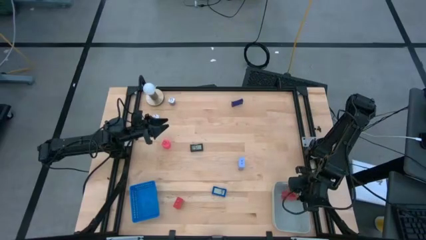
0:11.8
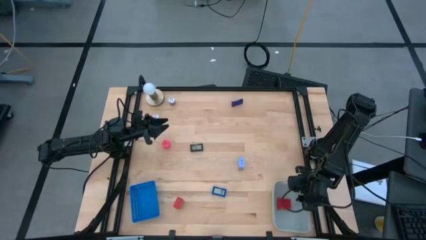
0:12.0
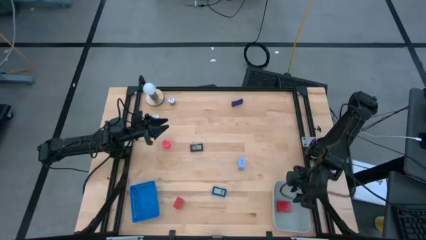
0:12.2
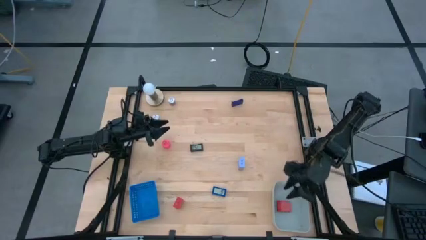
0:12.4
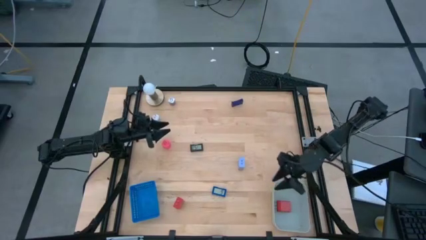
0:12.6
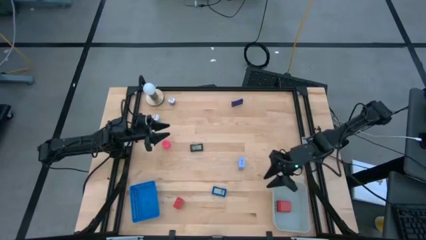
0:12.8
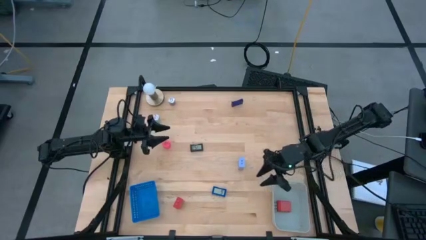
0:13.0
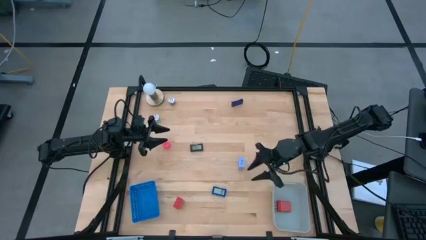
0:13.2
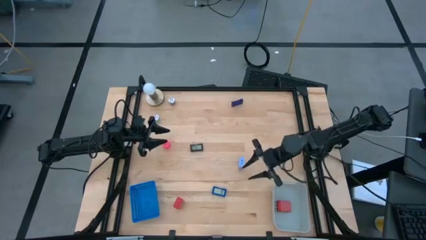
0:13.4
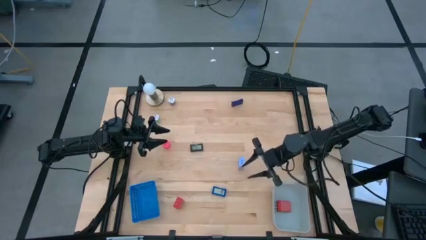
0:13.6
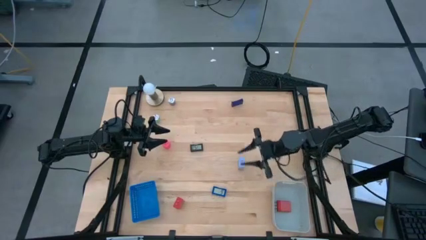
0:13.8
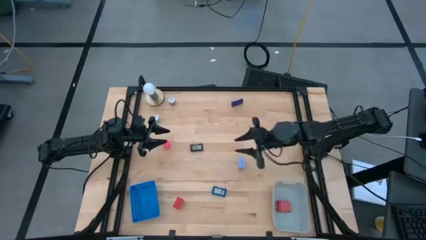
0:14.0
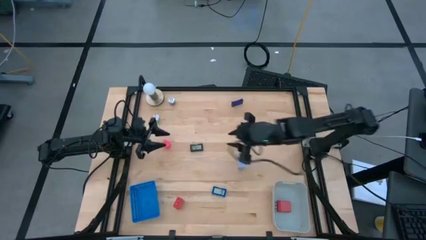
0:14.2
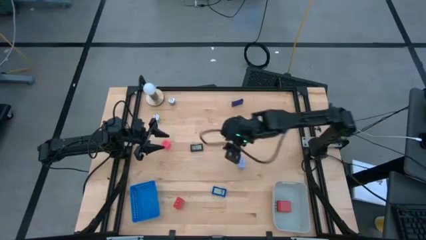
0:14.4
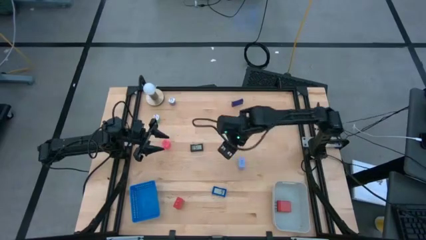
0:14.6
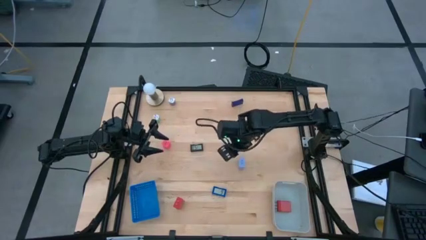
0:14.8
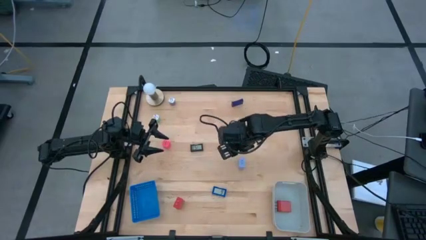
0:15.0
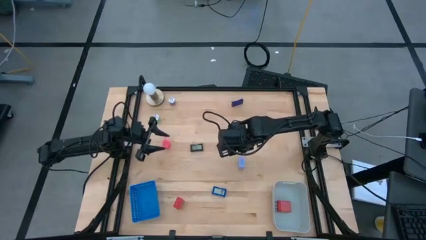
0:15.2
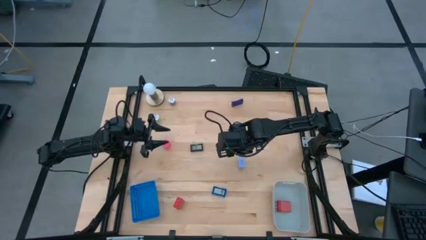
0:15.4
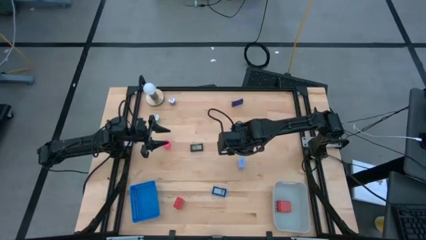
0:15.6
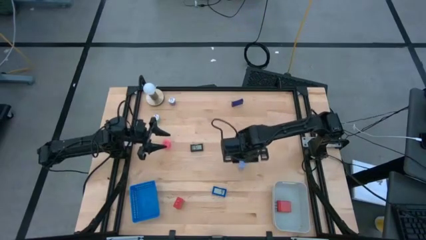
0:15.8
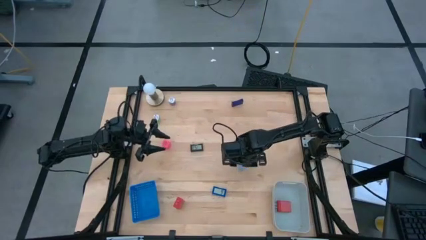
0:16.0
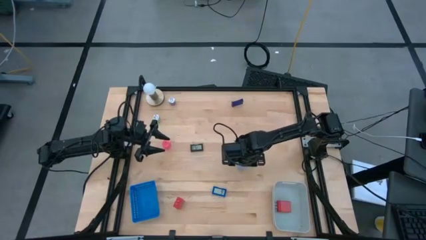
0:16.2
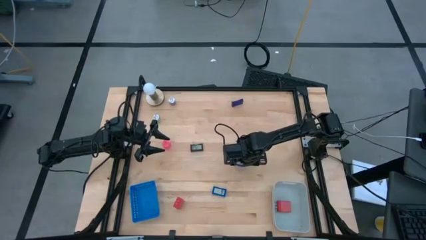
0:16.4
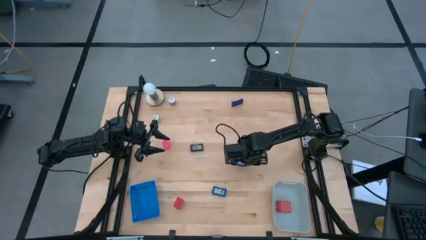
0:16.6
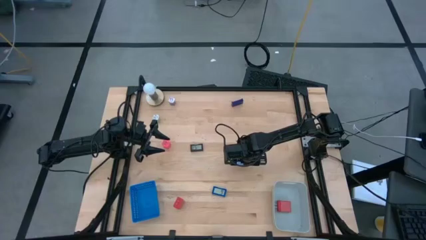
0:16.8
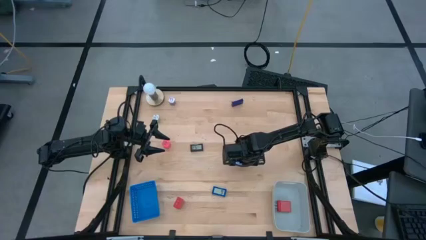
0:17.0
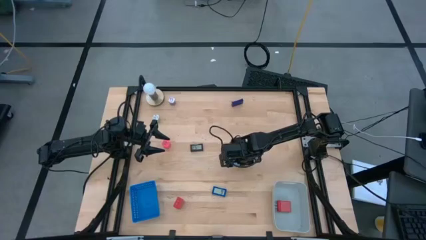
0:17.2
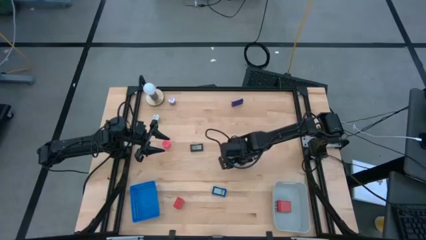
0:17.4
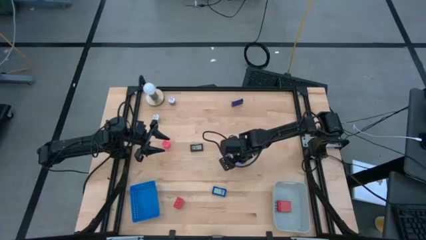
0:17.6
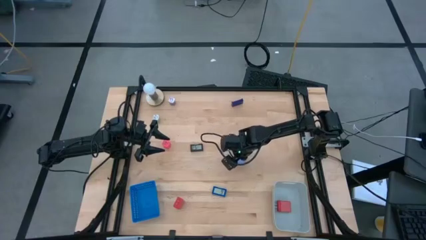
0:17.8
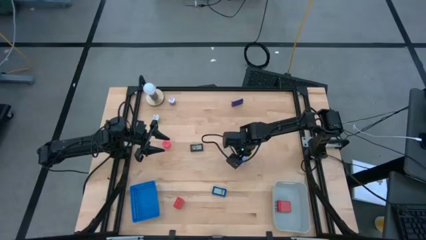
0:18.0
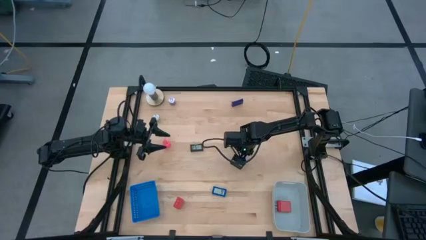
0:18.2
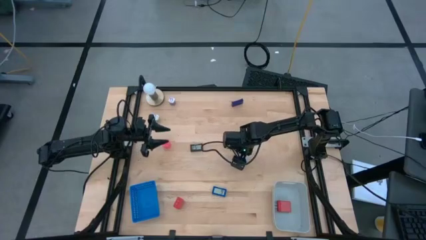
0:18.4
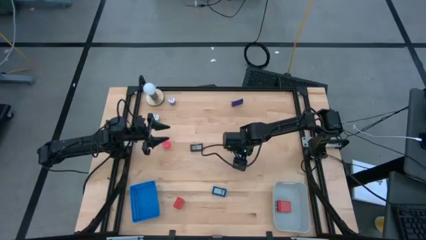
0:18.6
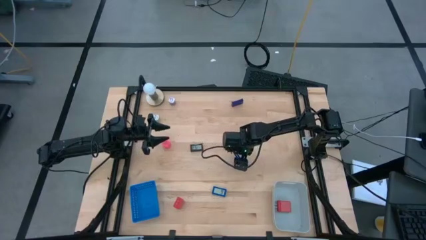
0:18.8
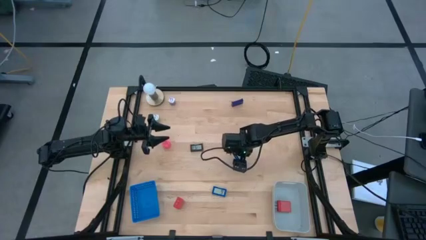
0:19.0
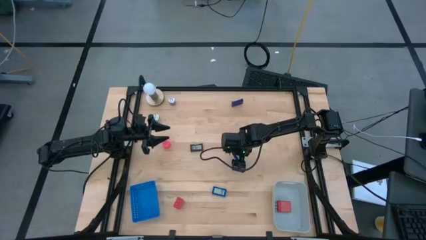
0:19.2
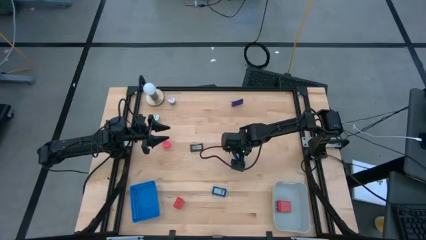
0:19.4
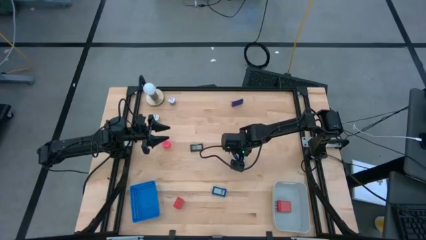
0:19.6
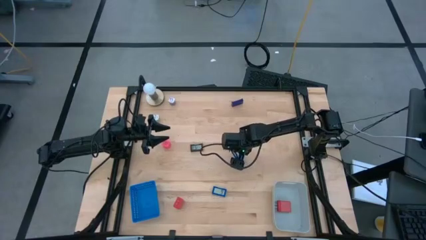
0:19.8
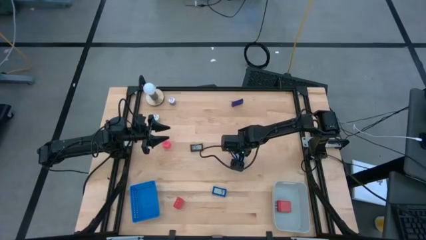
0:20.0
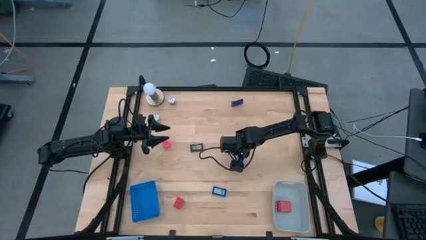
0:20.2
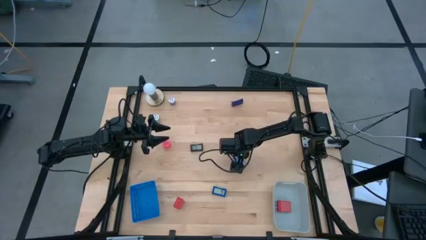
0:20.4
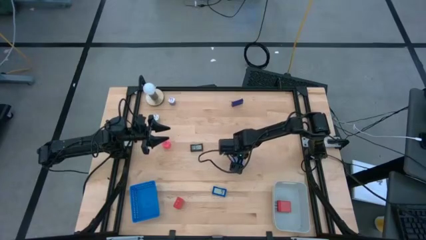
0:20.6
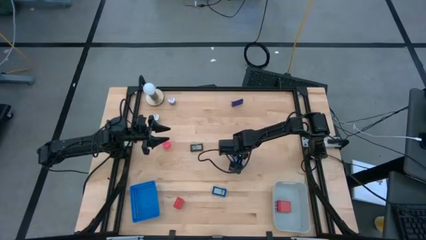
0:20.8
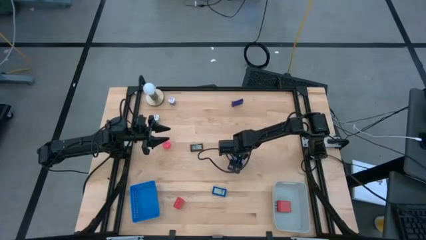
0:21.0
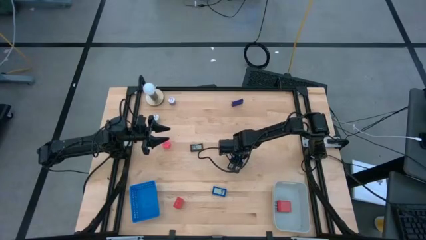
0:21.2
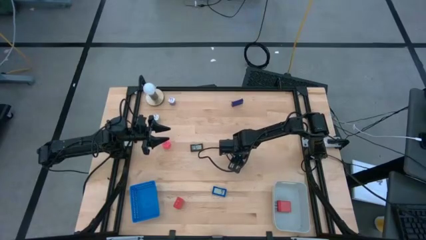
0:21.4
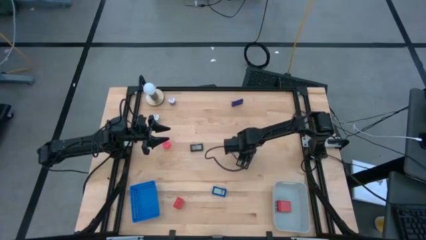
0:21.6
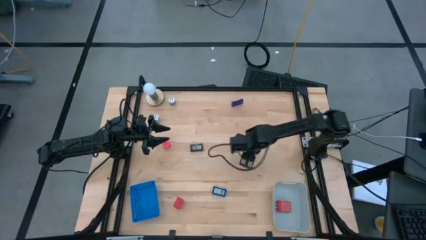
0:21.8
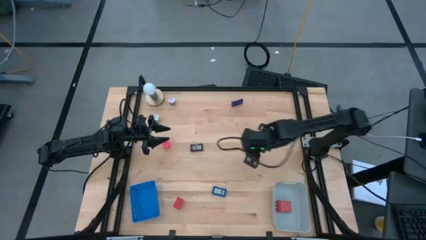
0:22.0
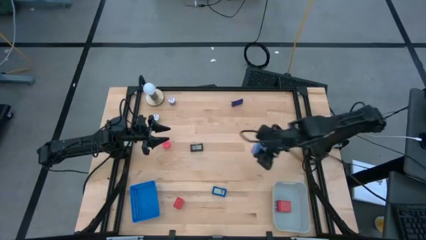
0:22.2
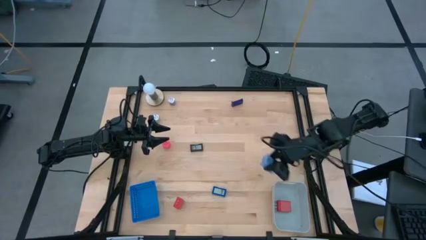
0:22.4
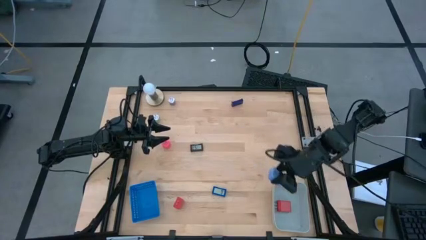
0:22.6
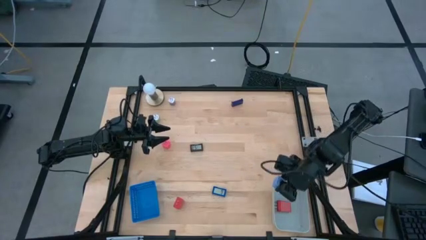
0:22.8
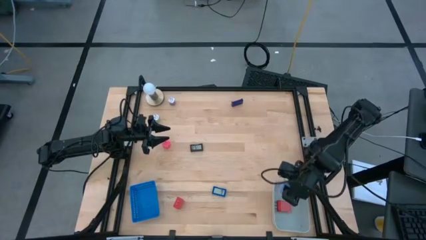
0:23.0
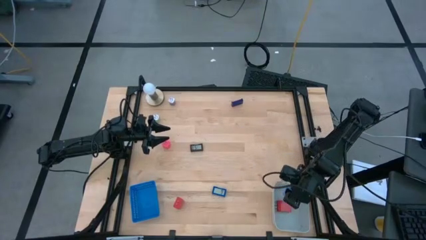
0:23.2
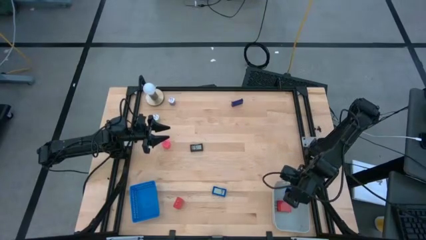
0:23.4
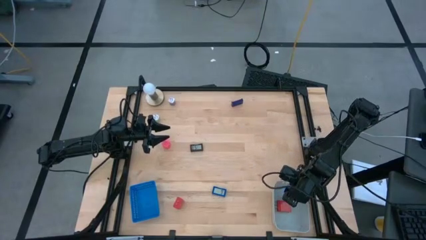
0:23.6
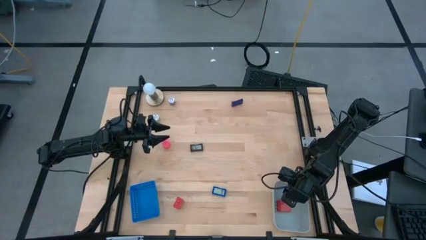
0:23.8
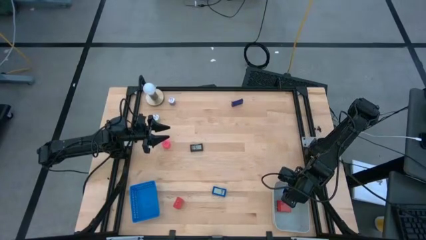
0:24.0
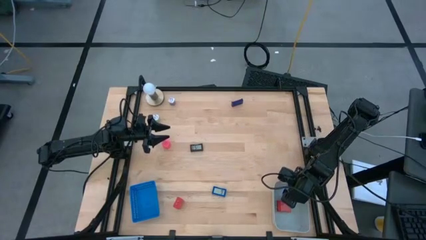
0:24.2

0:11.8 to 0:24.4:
Task: Pick & Place Office items
Put the blue charger adapter into the gray bin
